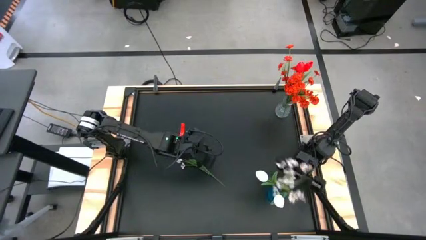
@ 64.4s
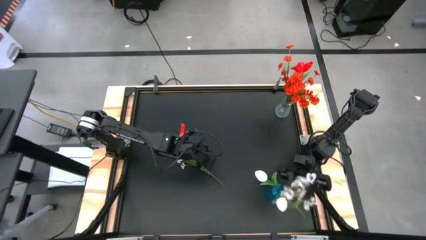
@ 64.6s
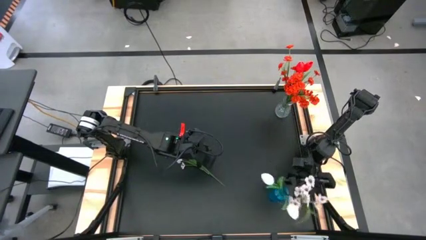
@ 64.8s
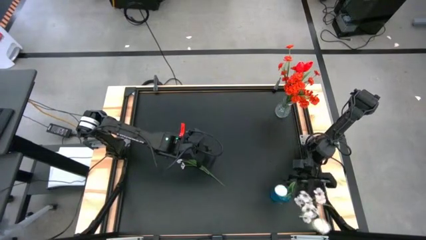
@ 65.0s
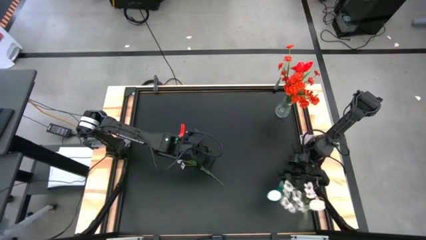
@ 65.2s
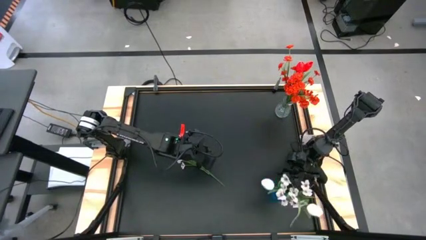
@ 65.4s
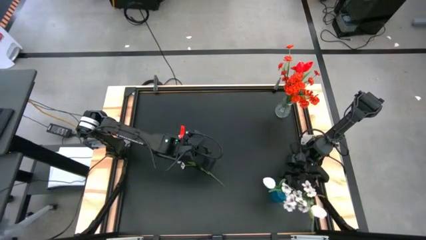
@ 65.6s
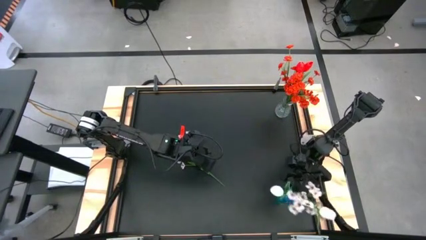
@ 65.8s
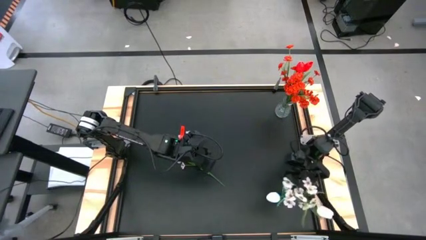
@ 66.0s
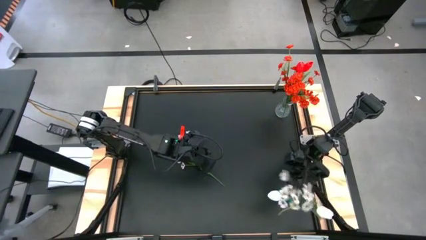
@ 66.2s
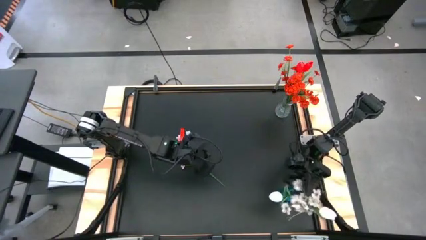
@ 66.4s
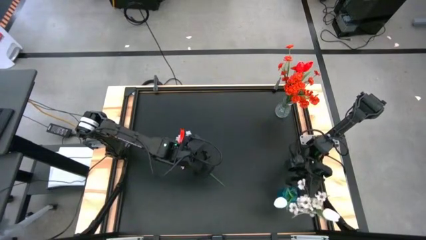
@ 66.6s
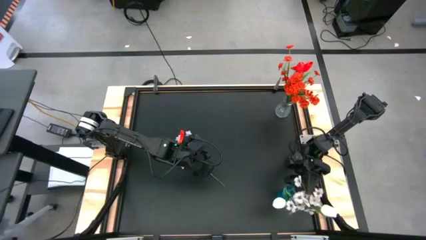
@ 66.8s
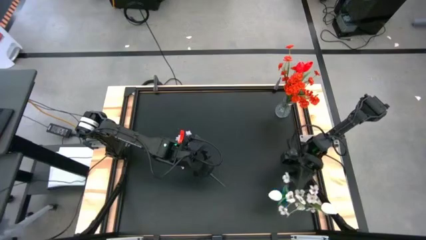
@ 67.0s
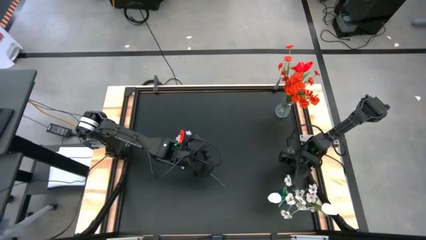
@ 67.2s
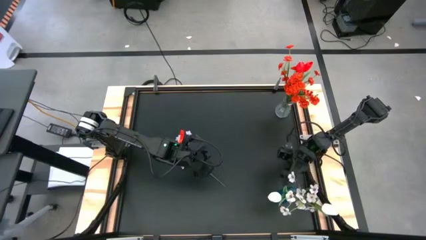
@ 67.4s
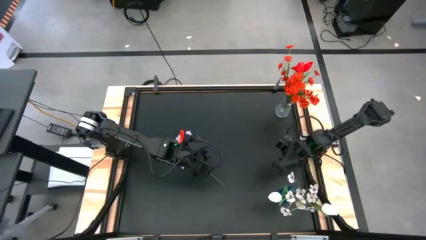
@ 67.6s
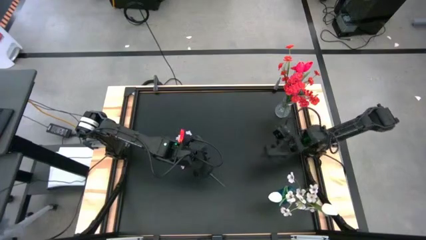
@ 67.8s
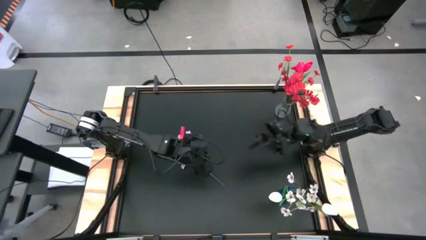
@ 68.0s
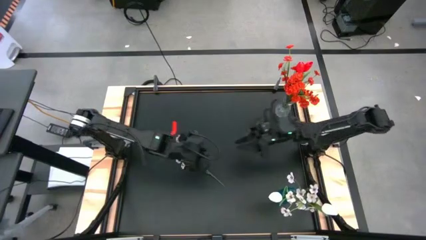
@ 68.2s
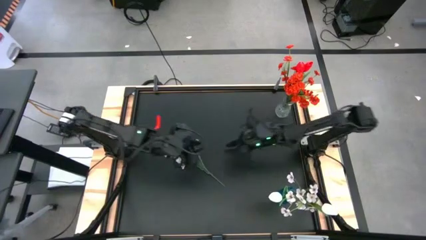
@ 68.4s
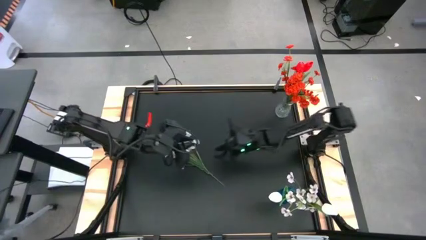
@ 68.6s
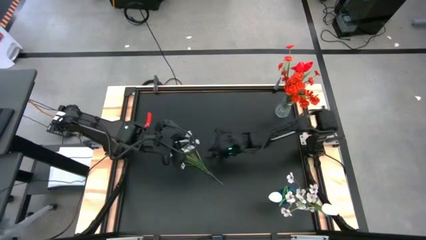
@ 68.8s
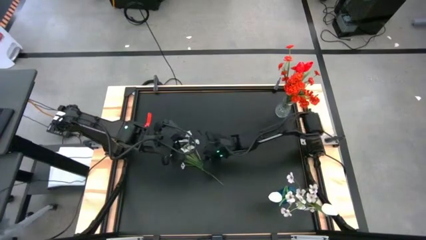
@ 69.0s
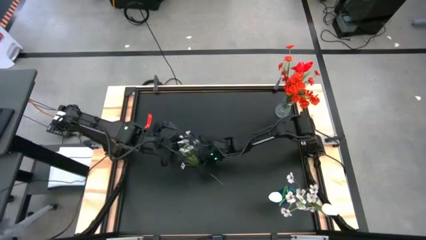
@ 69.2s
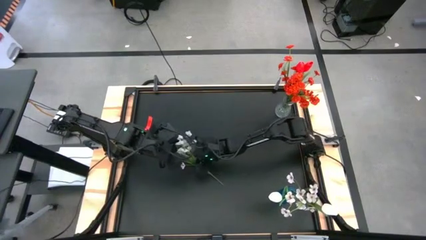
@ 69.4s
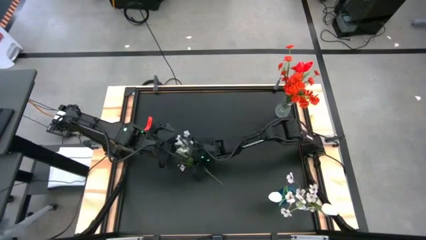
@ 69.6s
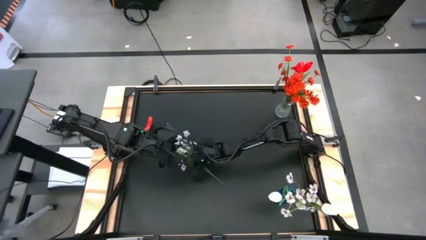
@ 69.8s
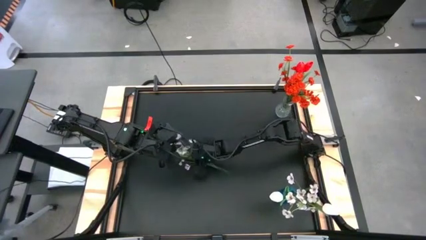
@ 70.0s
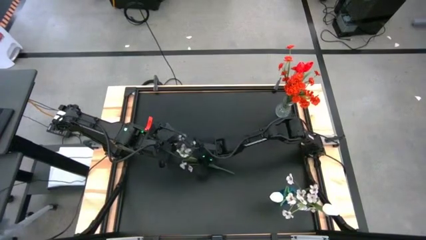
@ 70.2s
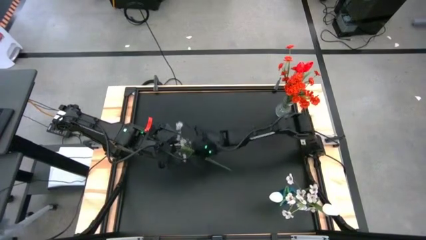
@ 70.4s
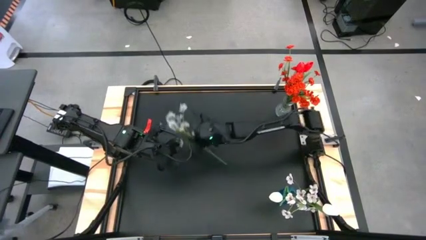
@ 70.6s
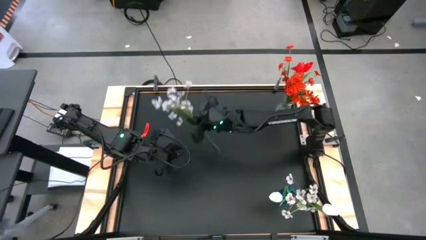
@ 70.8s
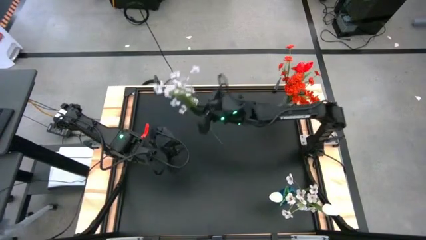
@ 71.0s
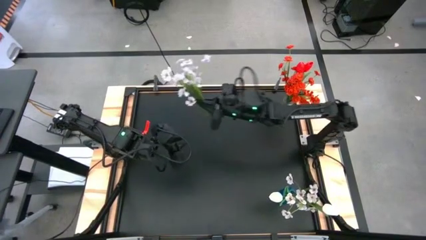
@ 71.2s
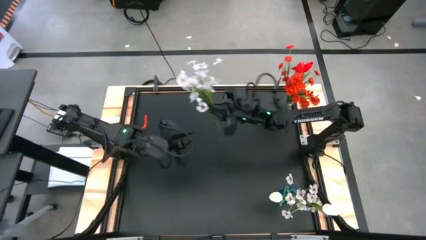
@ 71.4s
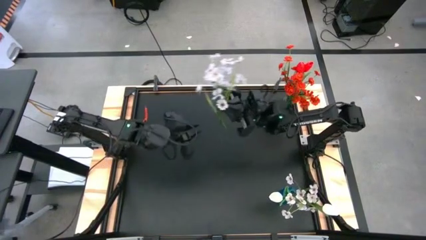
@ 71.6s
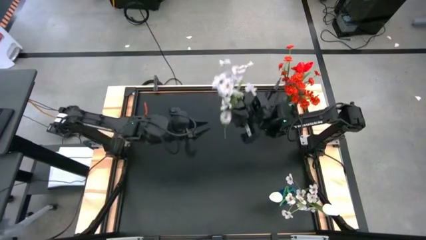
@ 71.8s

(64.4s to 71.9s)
Task: Sort flowers into vase by color
Put the white flowers into the blue vase

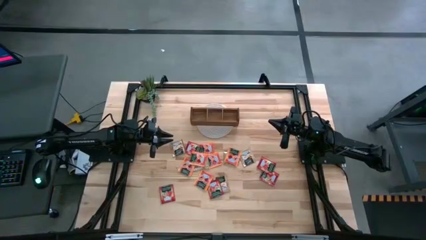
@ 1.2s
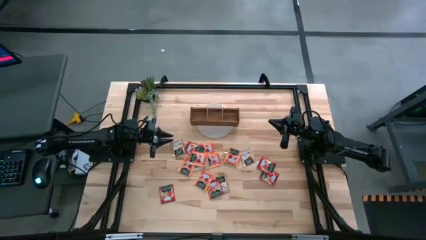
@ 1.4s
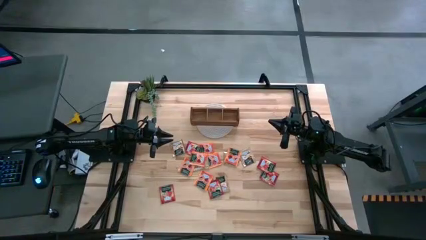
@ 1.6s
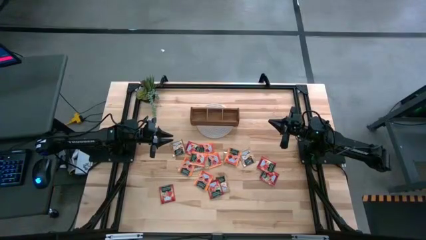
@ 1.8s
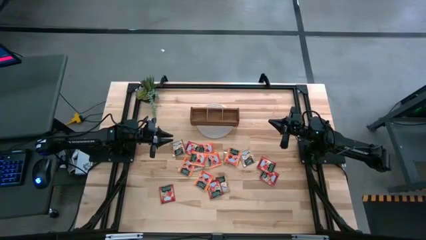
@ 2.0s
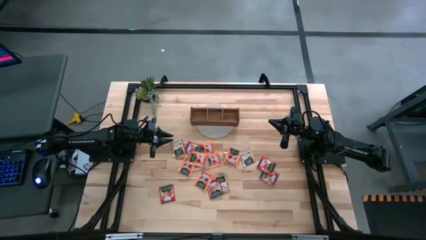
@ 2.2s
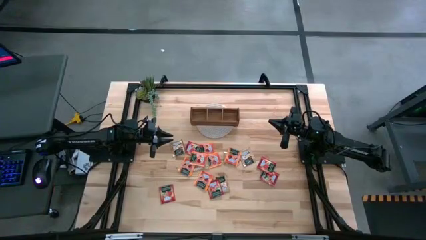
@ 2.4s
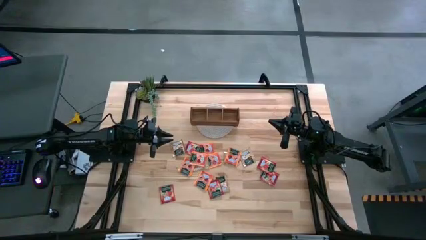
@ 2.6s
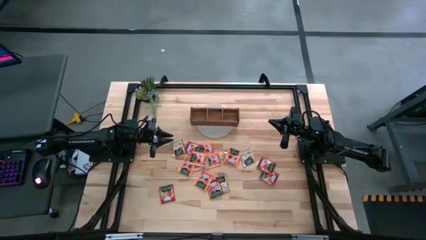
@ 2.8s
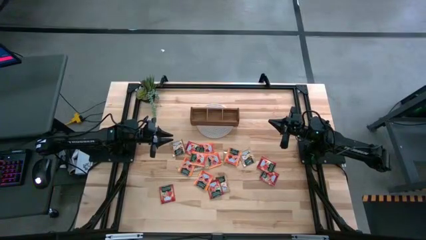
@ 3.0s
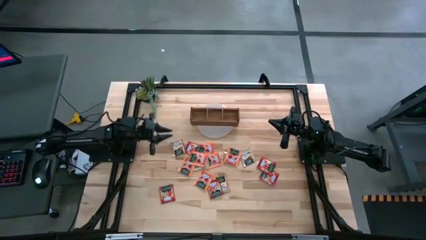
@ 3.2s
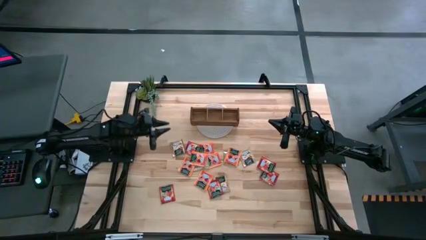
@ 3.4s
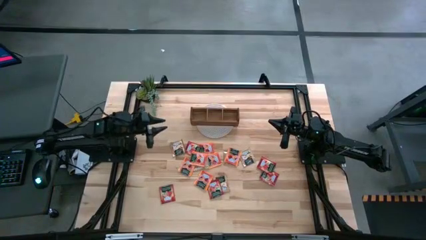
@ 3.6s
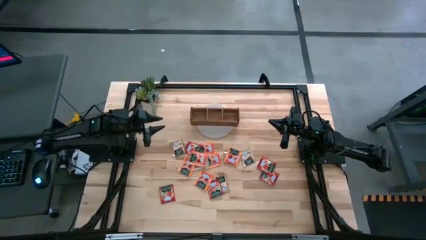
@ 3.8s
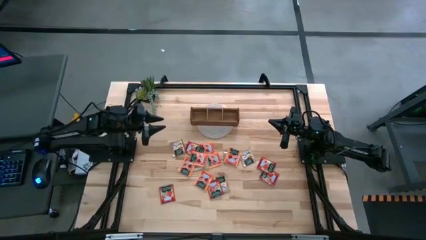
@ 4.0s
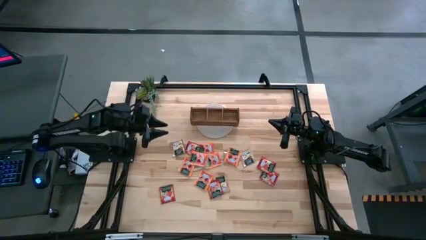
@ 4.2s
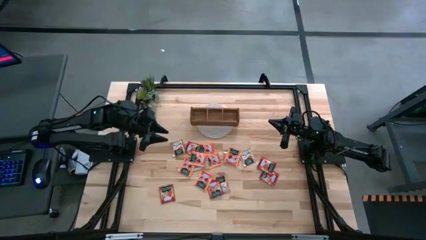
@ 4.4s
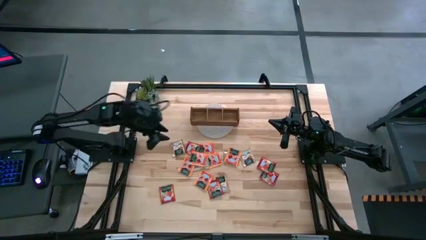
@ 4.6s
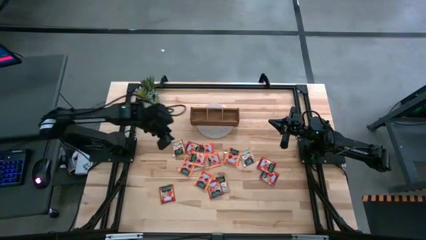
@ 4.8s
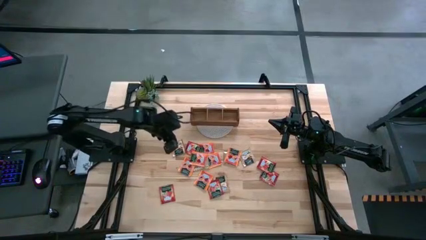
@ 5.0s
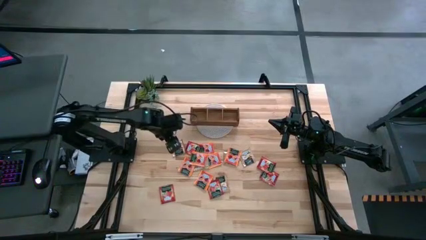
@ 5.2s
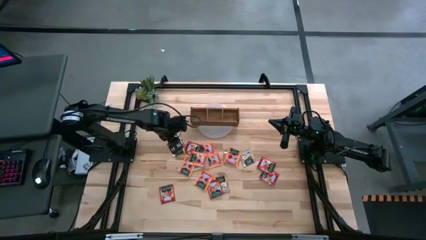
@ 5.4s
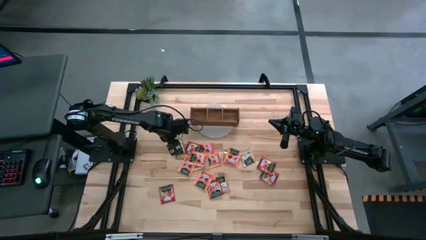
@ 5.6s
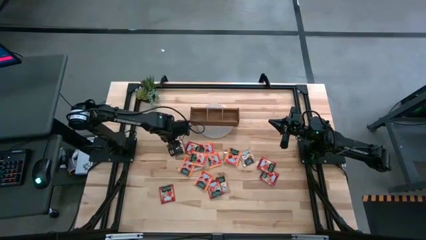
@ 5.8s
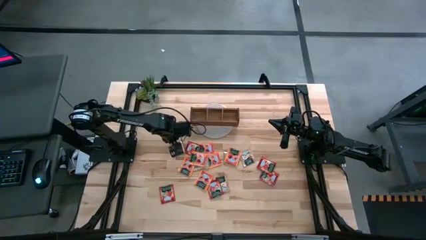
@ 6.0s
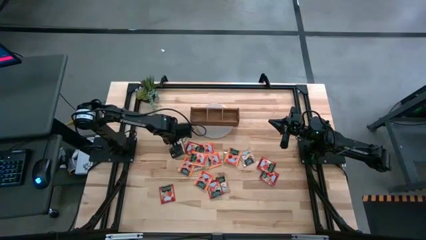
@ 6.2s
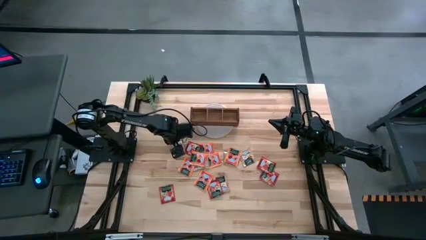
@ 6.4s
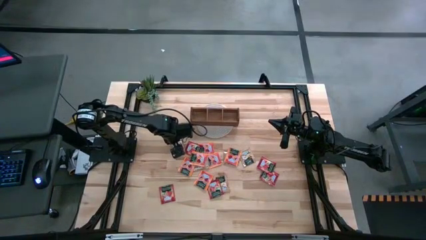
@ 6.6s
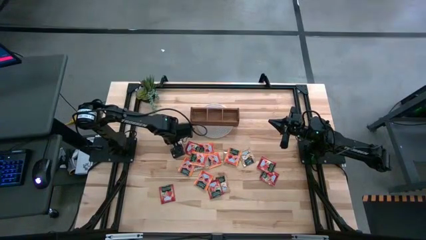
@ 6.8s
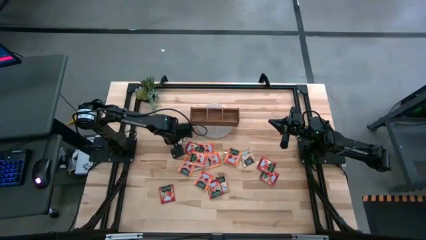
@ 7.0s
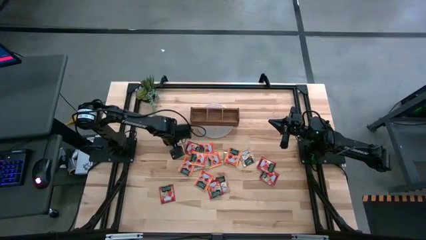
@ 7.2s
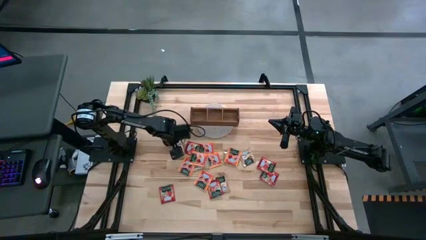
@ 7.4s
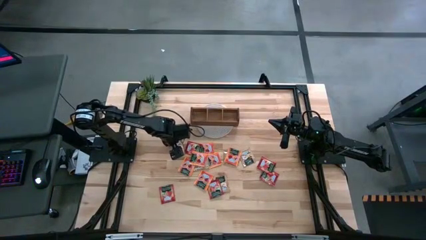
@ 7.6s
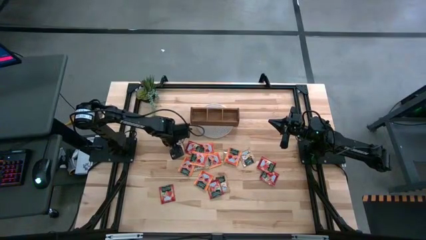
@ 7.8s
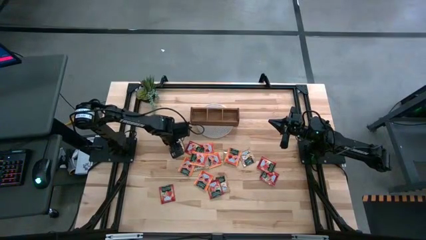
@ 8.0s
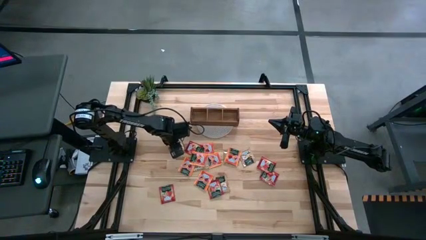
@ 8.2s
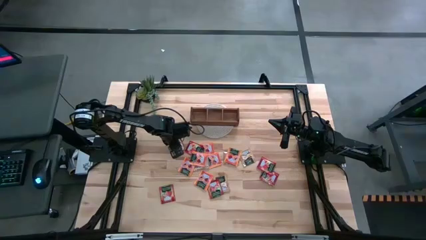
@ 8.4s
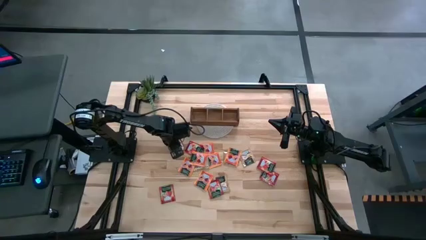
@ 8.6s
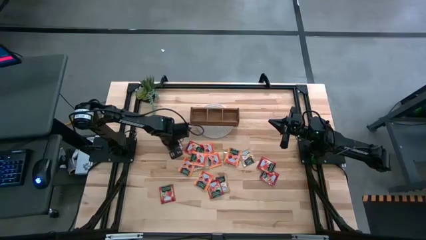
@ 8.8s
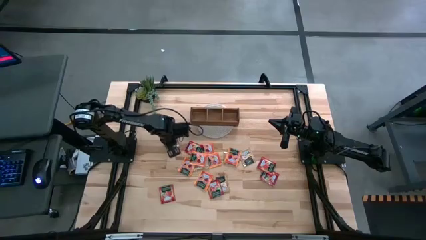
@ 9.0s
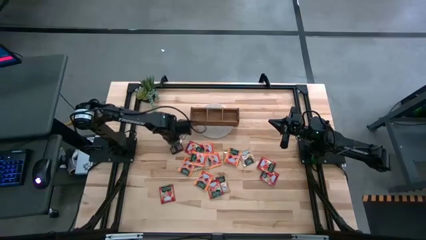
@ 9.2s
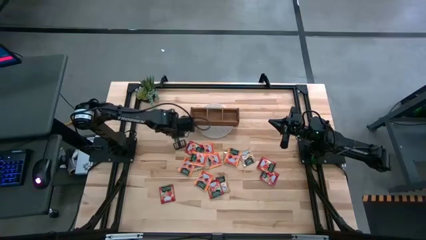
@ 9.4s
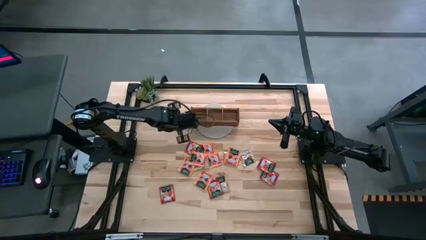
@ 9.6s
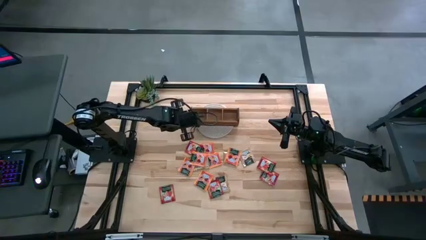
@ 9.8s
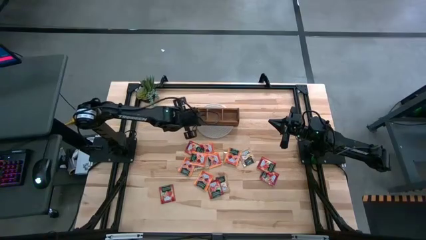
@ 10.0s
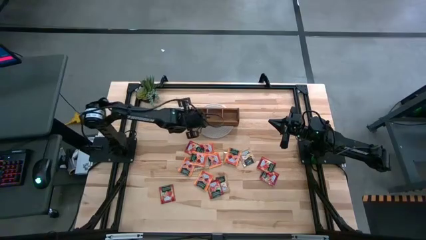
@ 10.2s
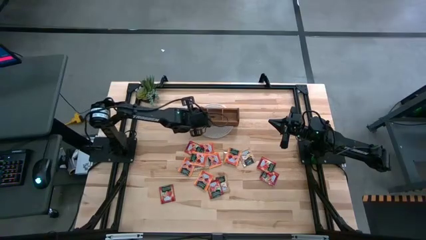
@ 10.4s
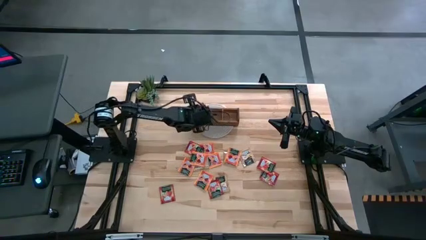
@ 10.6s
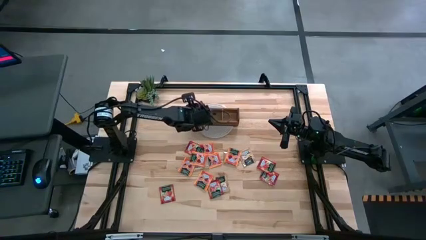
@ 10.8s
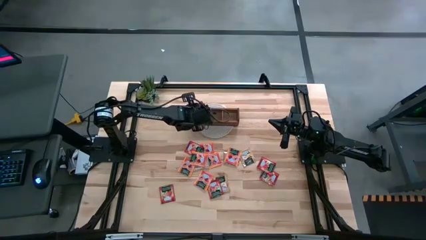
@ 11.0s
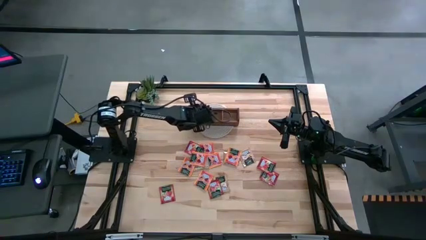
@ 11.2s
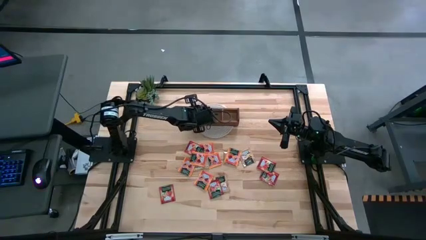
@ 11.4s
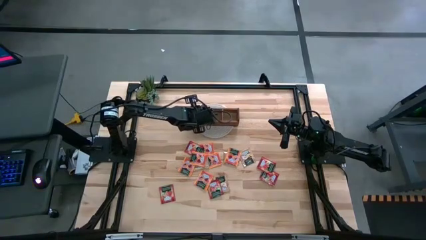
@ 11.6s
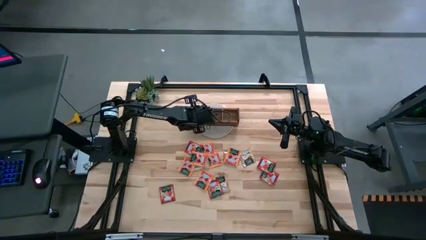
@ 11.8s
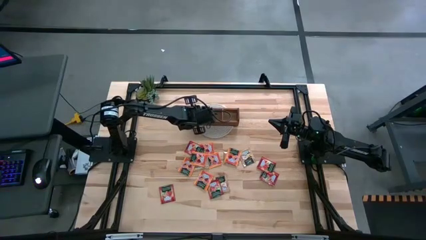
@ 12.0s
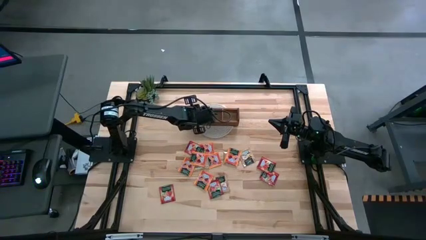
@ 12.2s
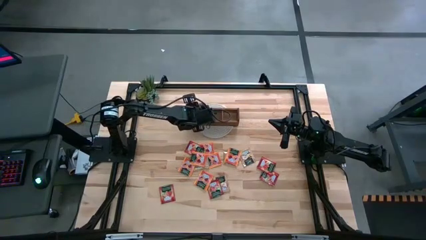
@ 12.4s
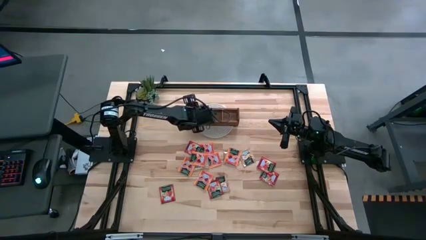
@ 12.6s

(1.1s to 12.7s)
Task: Pick & Place Tea
Put the brown tea bag in the left section of the wooden organizer
